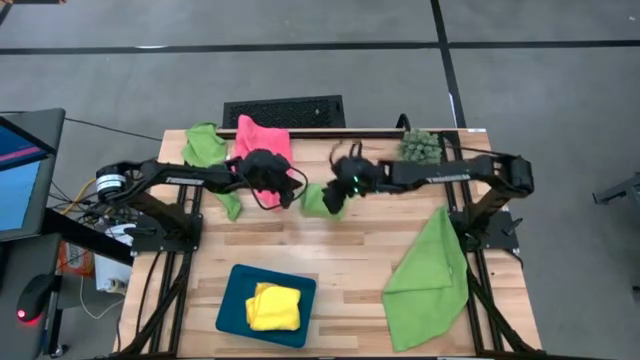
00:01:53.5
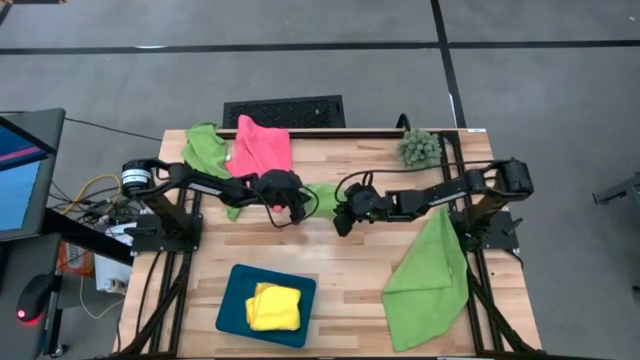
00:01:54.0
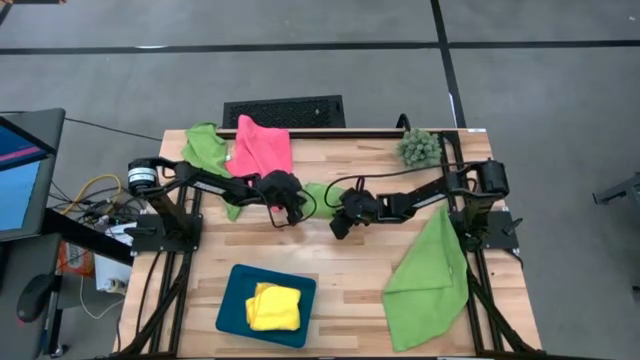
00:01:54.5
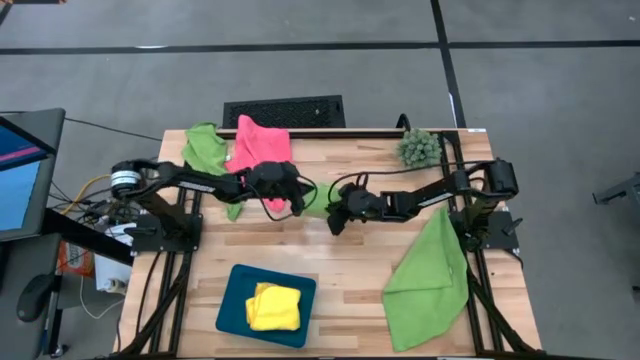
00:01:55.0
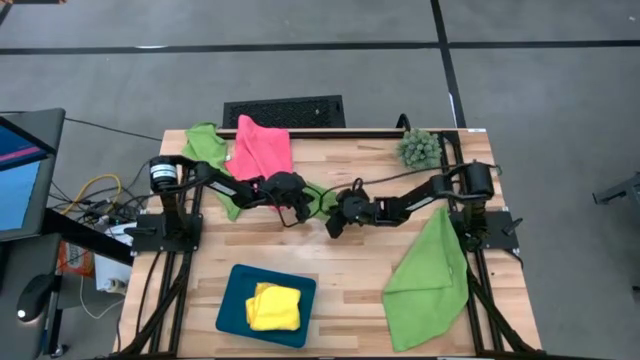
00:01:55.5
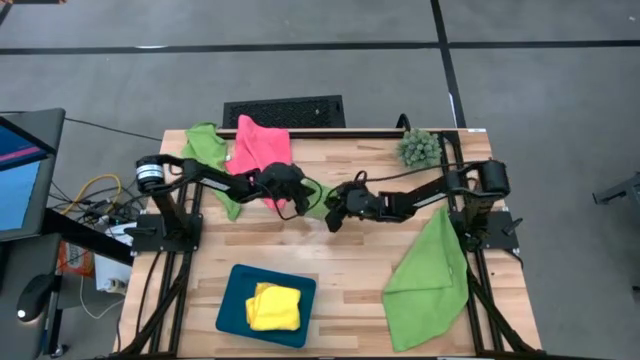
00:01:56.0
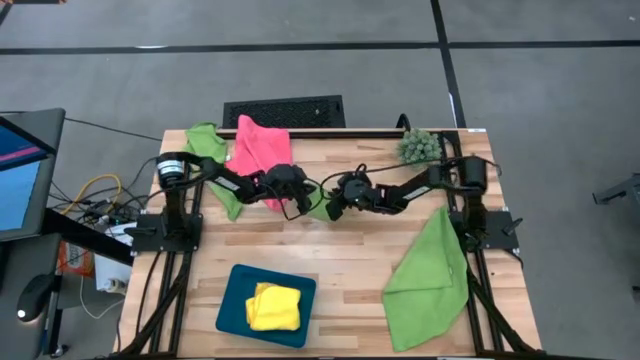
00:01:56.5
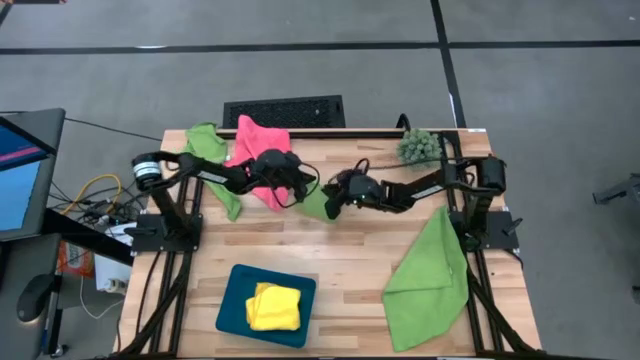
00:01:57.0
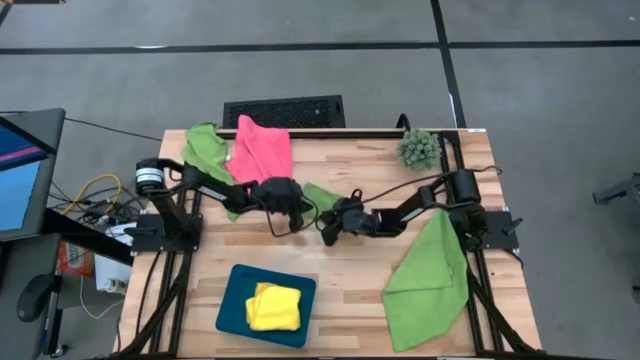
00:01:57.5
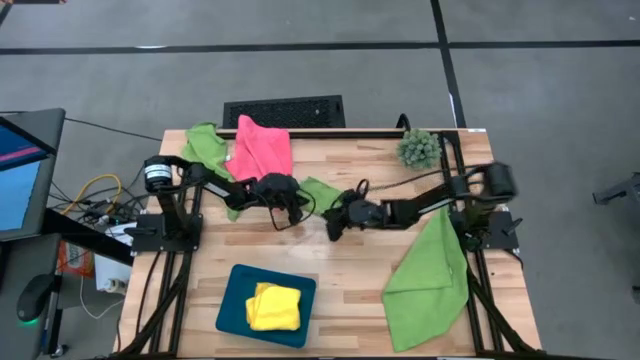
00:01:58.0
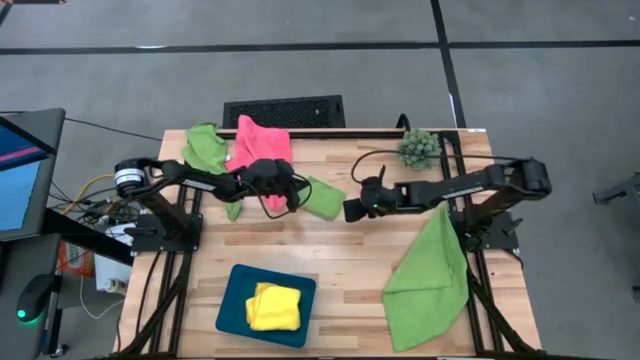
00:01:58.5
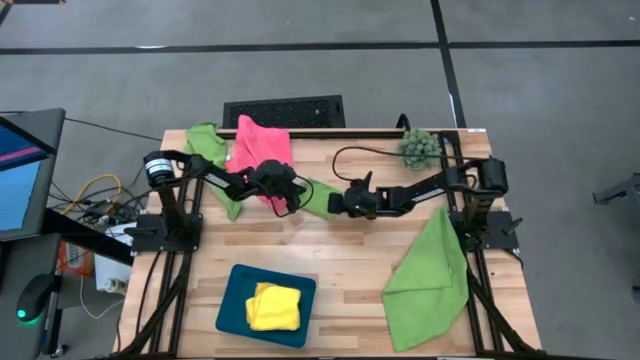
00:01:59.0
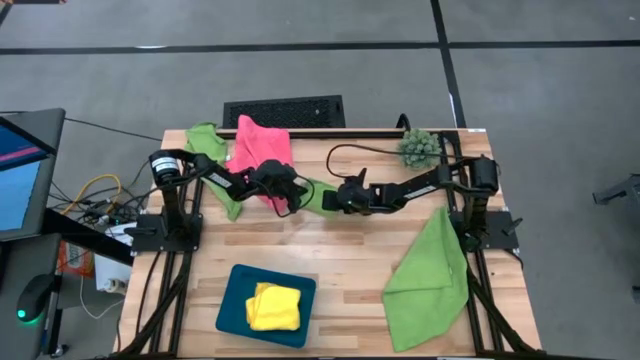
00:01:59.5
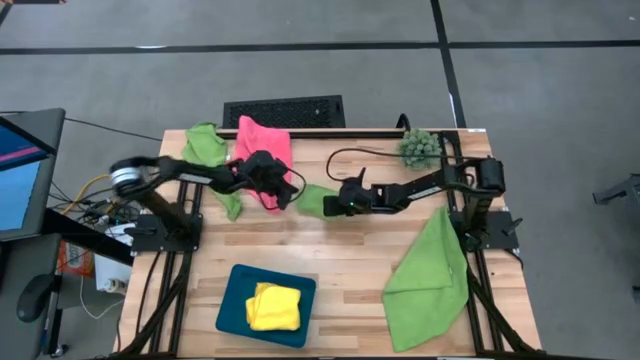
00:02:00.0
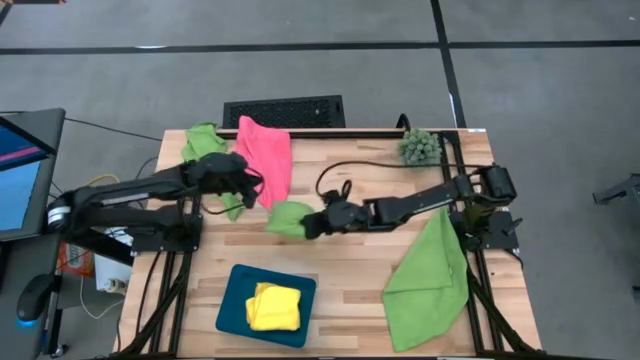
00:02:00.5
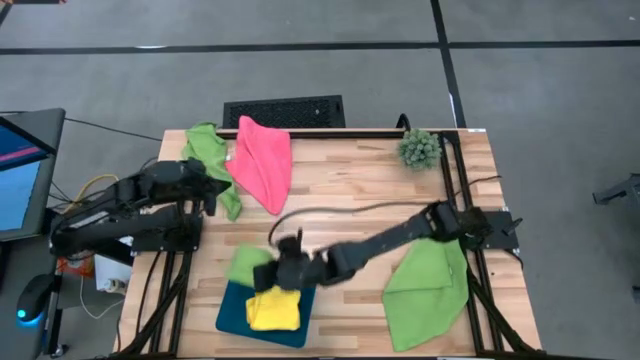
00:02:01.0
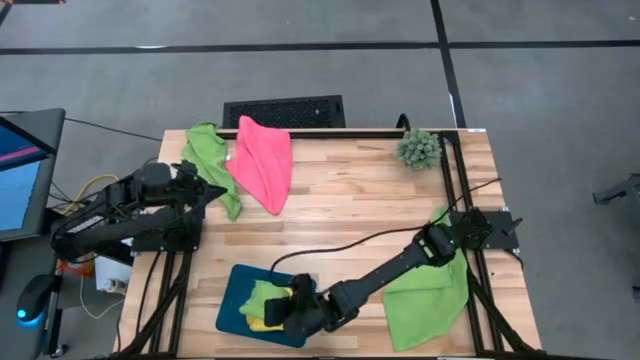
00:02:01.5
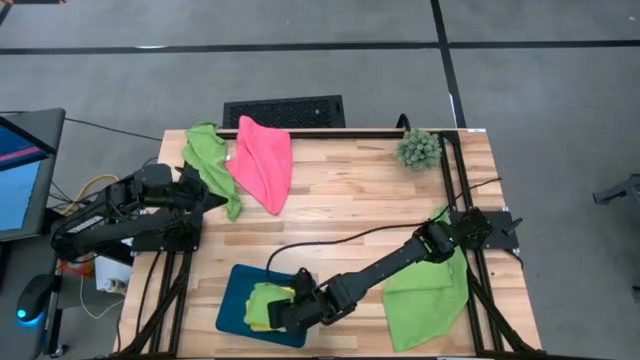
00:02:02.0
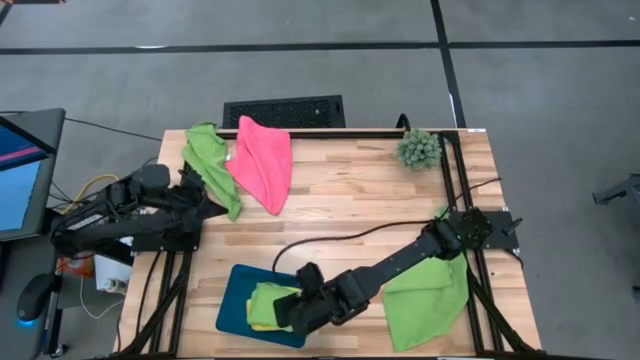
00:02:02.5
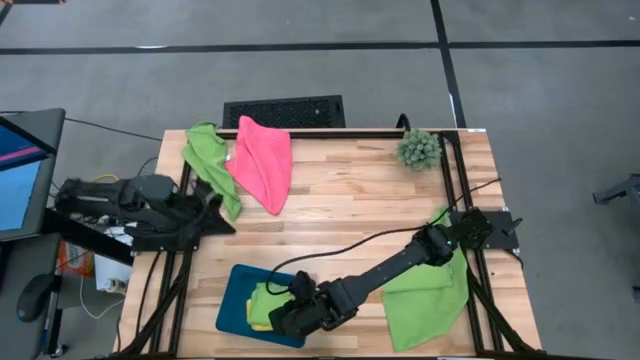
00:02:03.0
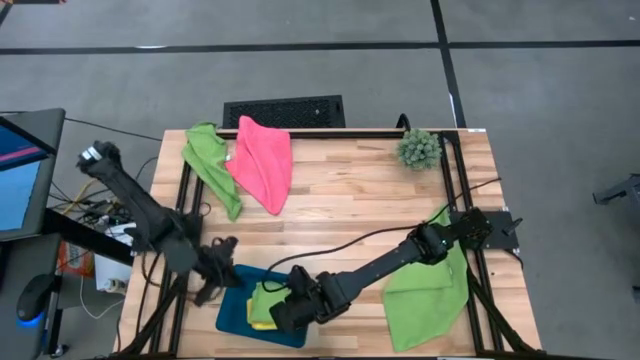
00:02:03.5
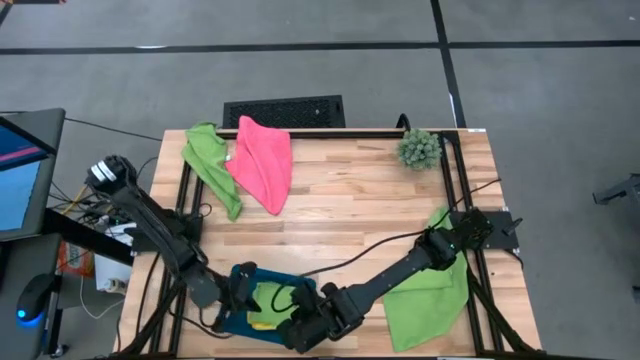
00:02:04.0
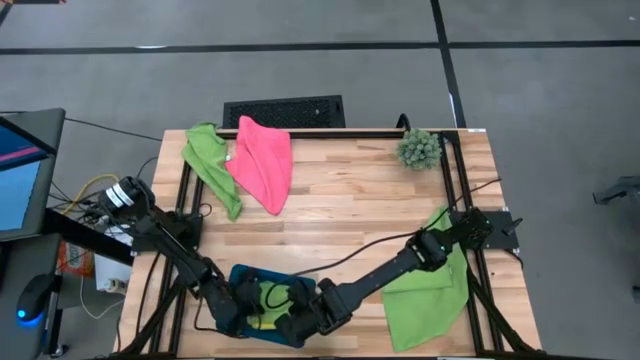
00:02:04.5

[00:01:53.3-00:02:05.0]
Task: Fold microfiber towels
Stack the top right green microfiber towel on top of the yellow microfiber towel in the blue bin

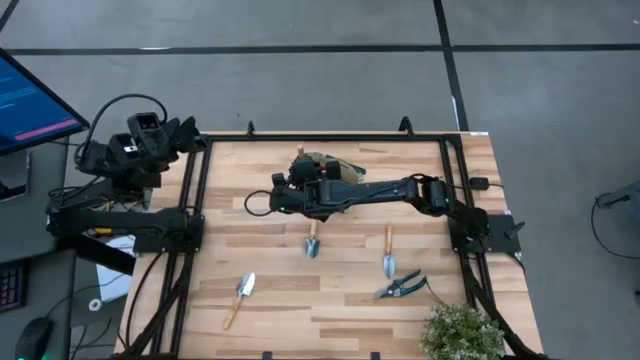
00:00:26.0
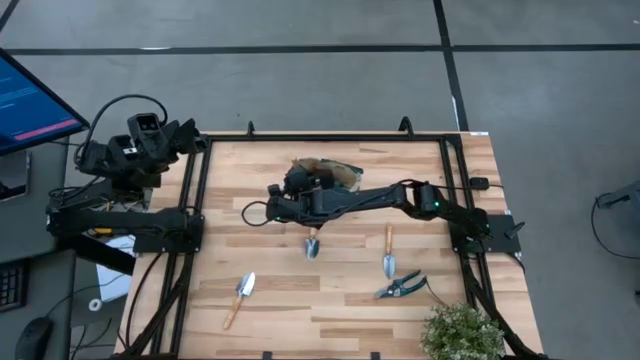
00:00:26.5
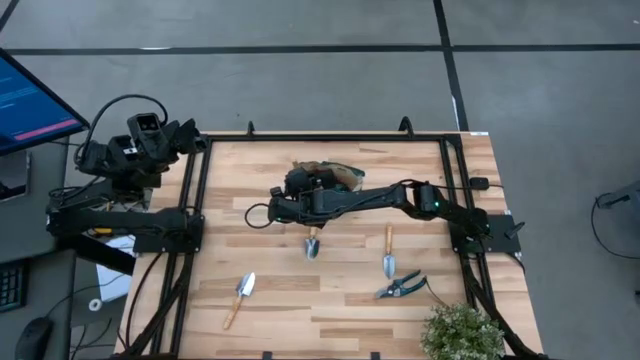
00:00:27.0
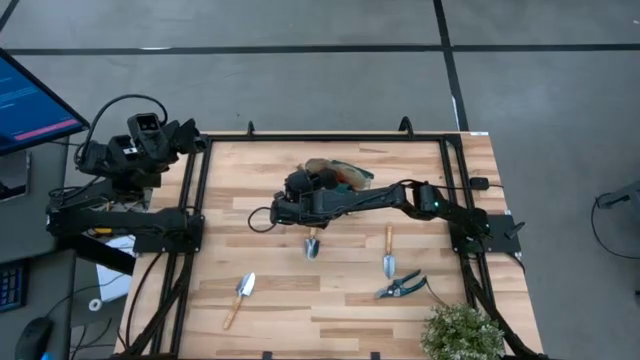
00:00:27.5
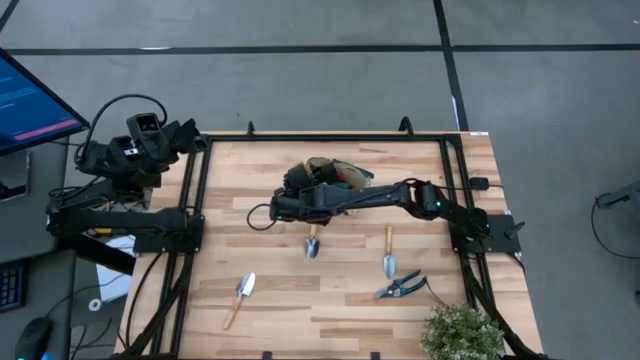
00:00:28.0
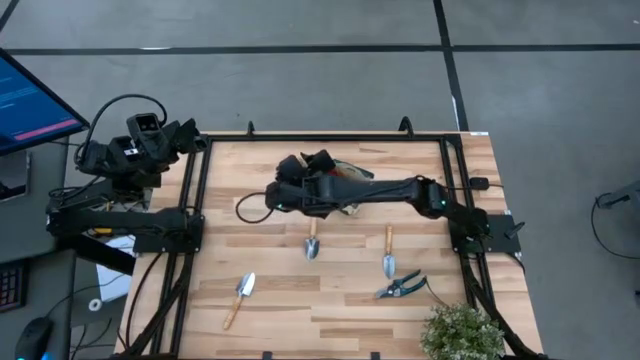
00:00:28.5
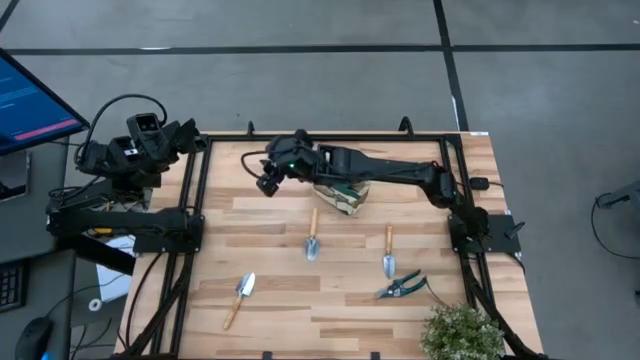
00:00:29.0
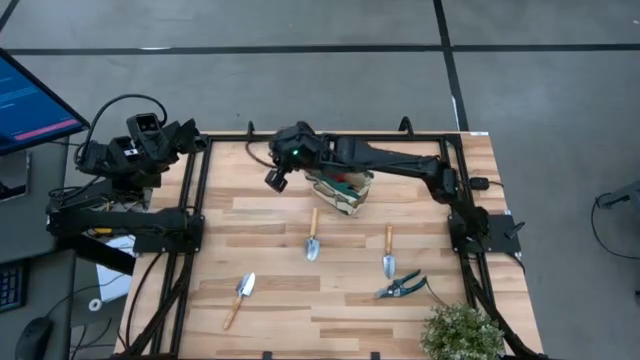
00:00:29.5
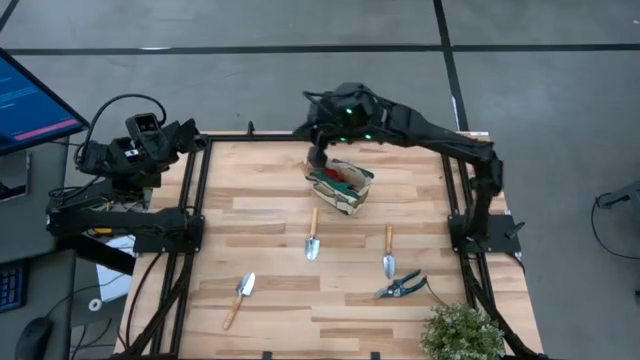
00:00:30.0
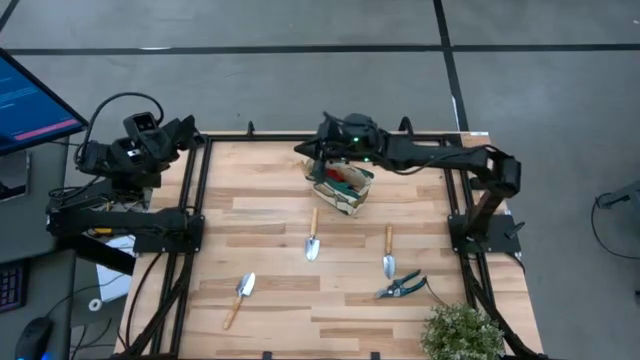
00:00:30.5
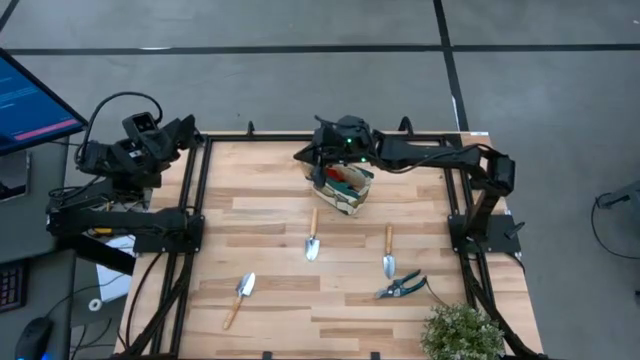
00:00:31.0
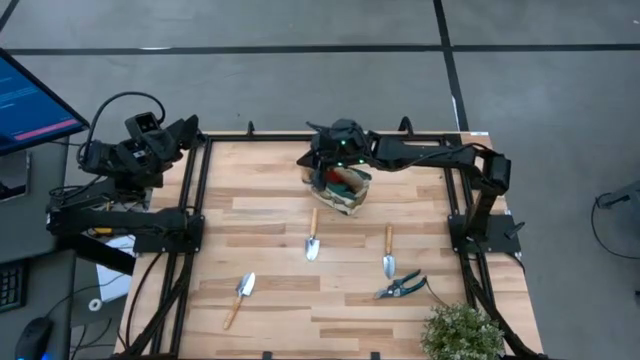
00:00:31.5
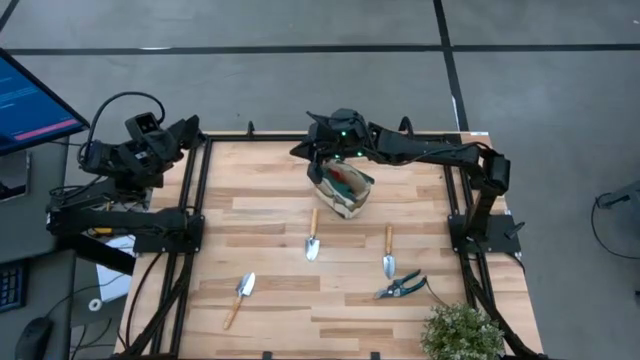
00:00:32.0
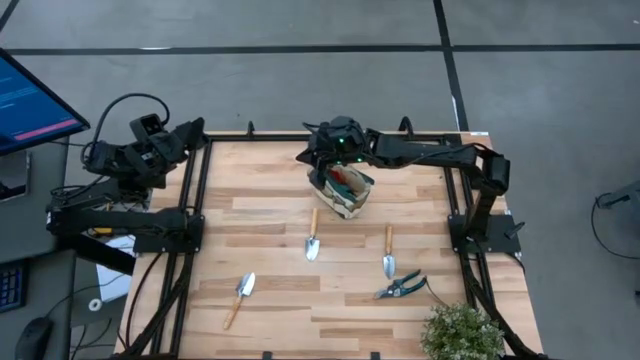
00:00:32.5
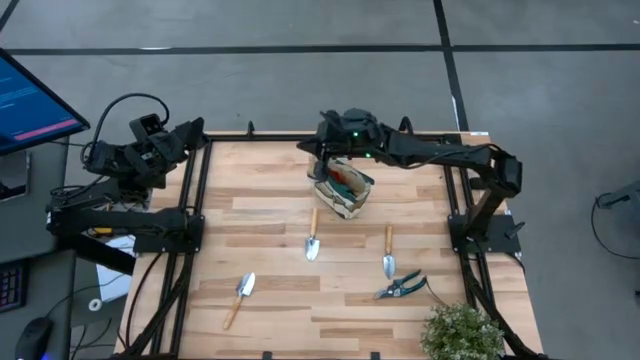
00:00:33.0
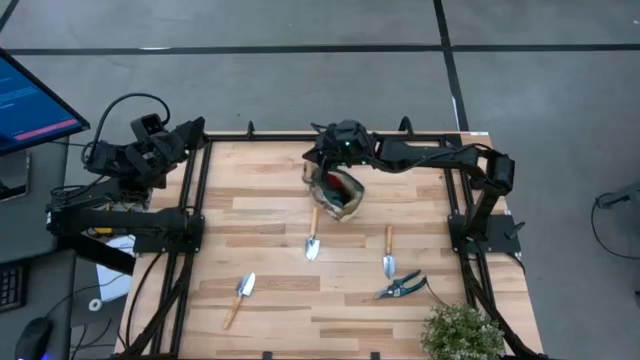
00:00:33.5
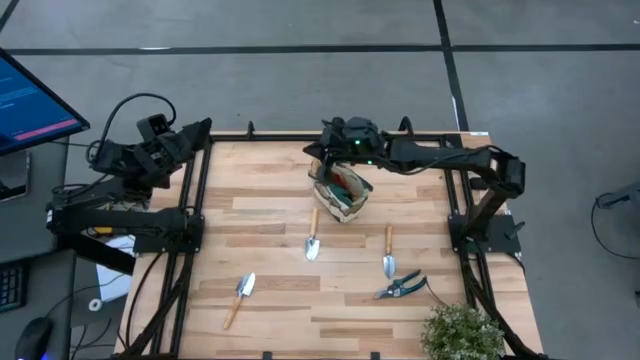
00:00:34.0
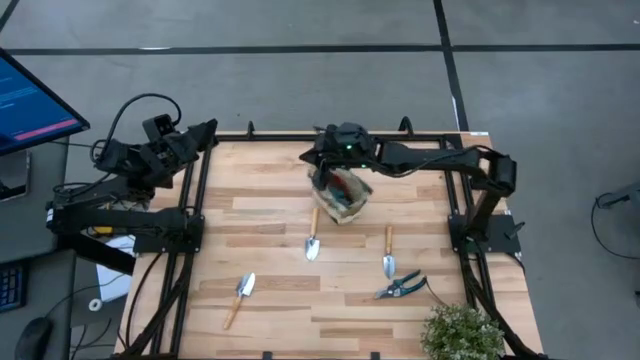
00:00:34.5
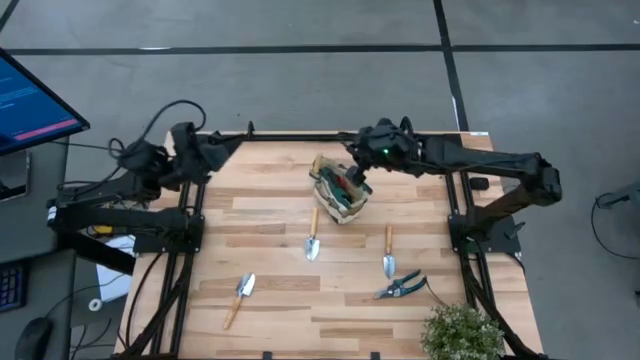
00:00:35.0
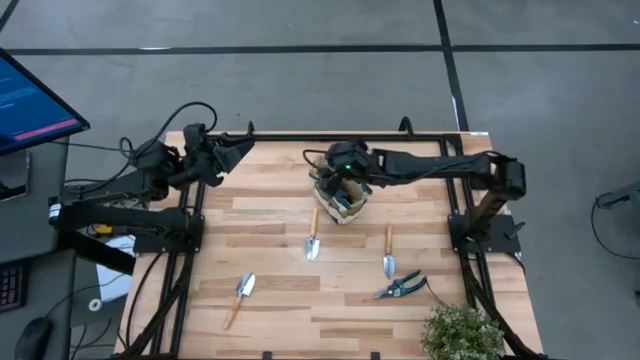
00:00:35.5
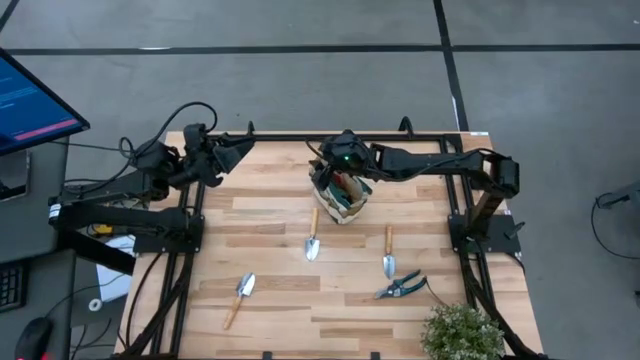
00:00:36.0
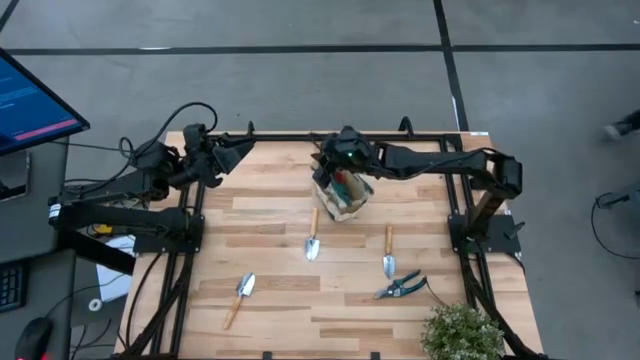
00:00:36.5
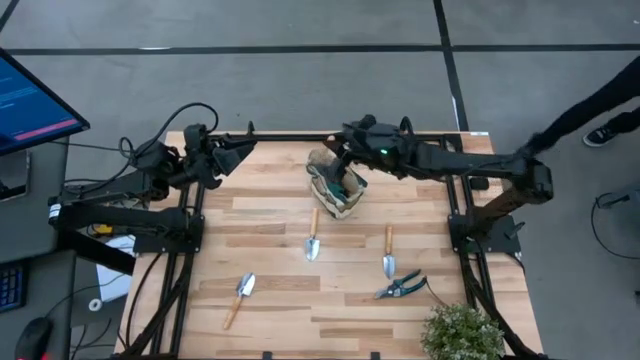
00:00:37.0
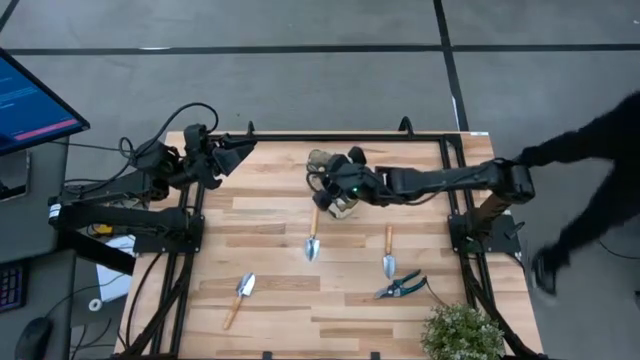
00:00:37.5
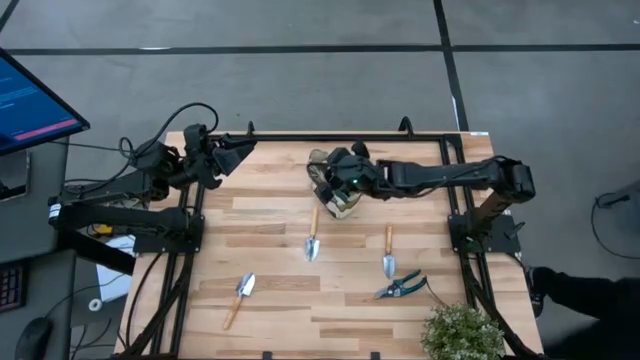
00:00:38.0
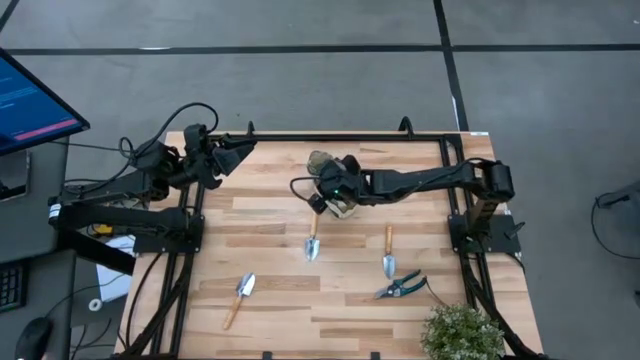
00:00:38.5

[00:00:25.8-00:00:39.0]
Task: Pick & Place Garden tools in Gardening bag
Put the brown trowel into the gardening bag
